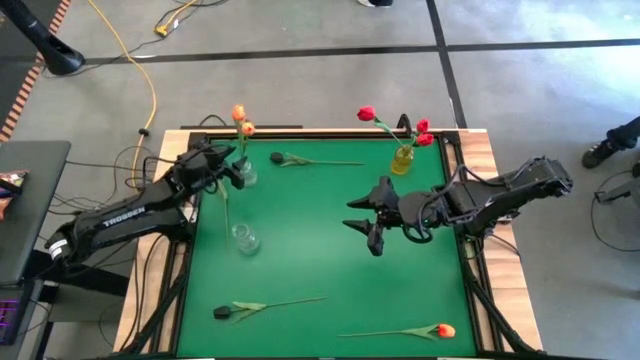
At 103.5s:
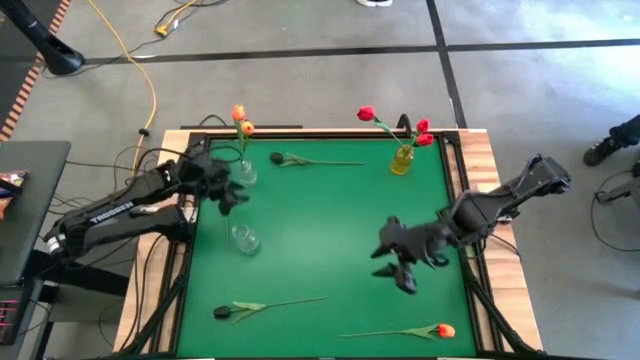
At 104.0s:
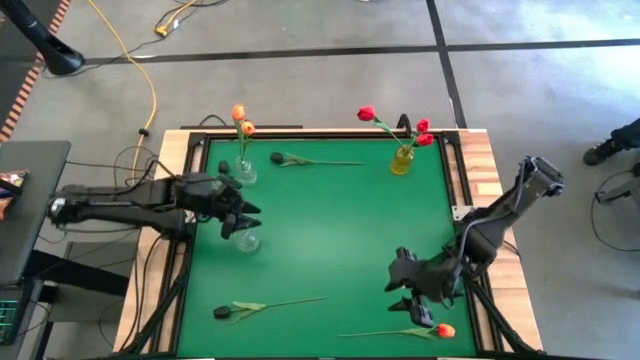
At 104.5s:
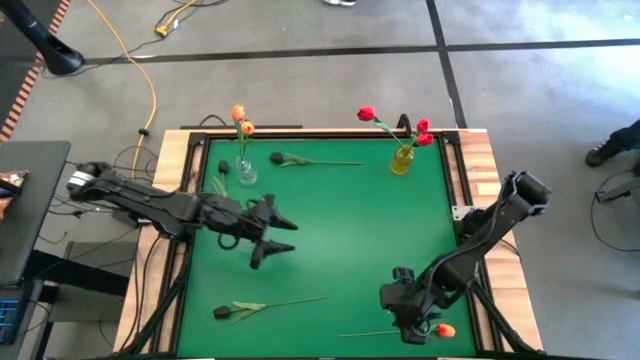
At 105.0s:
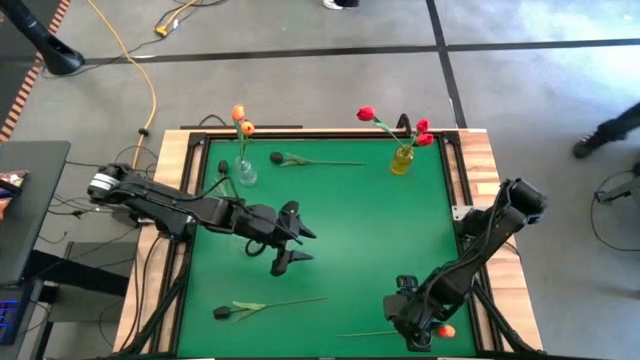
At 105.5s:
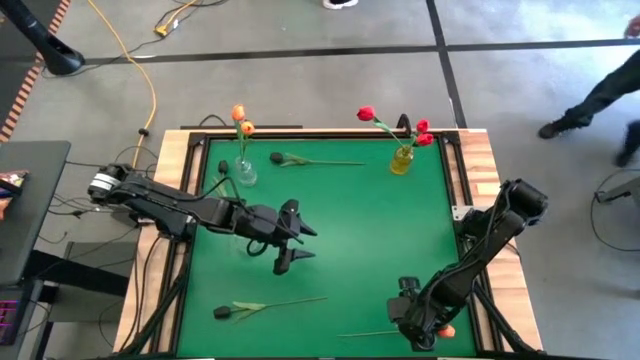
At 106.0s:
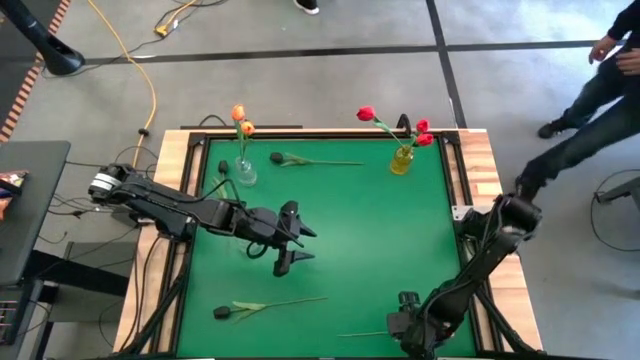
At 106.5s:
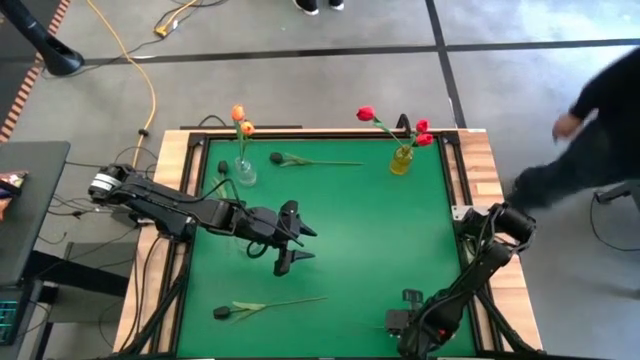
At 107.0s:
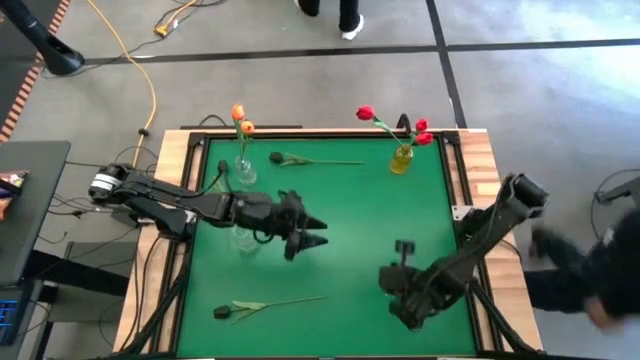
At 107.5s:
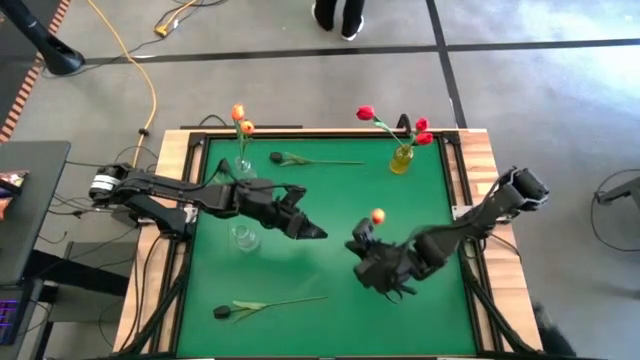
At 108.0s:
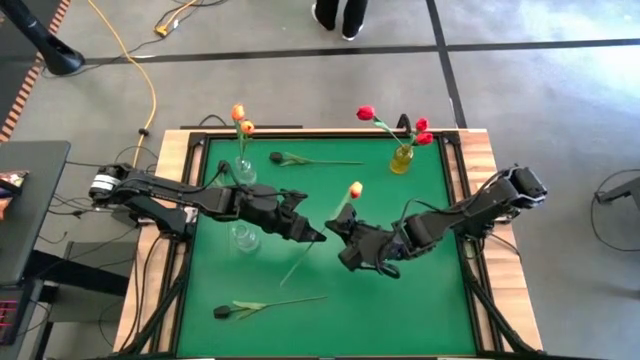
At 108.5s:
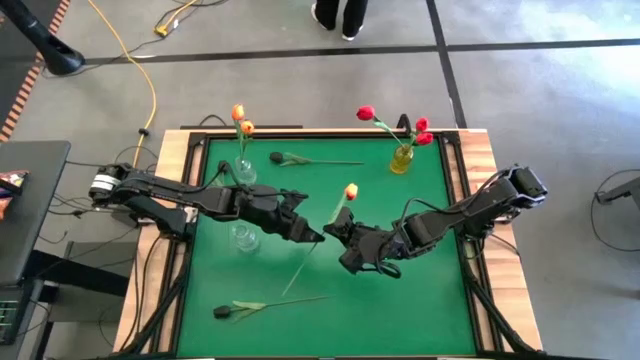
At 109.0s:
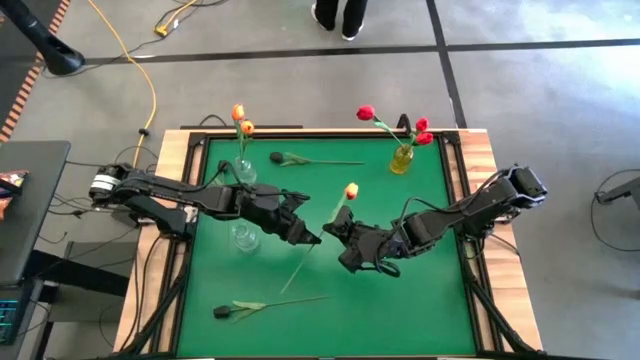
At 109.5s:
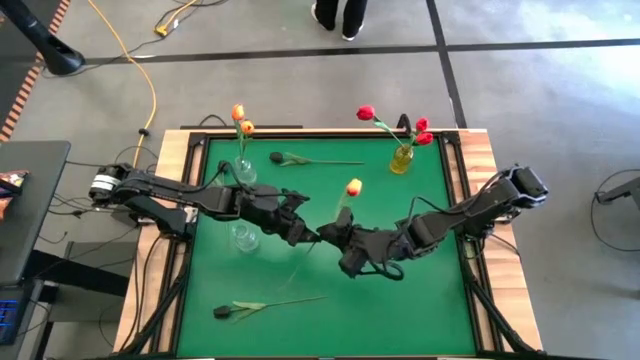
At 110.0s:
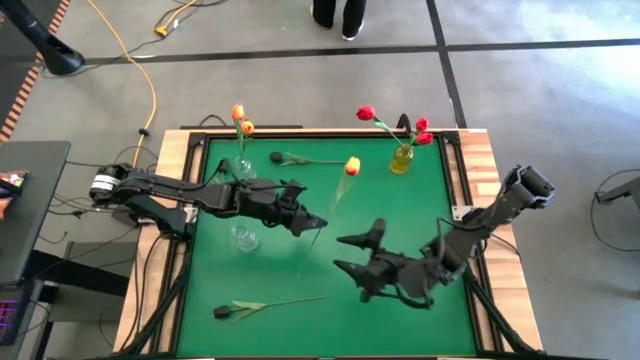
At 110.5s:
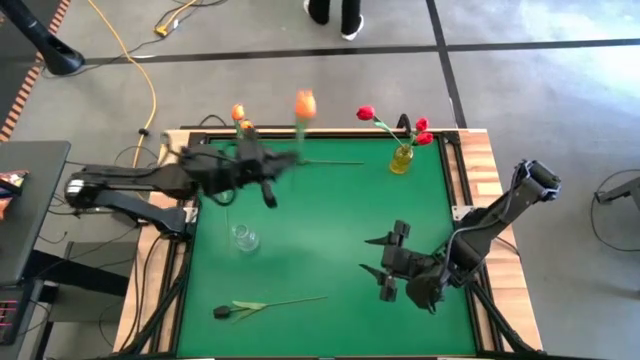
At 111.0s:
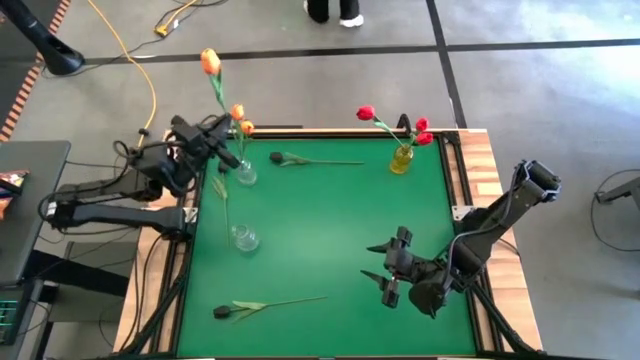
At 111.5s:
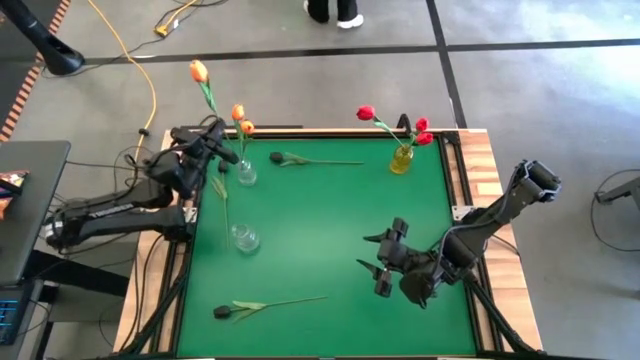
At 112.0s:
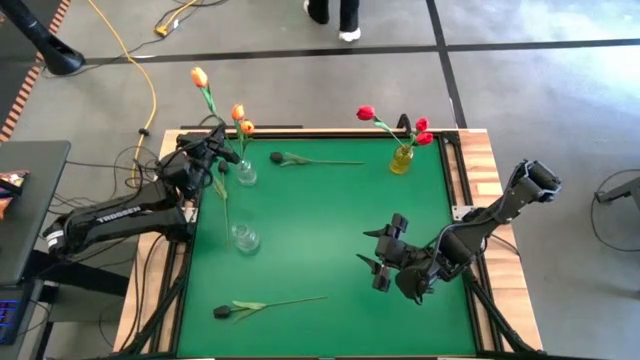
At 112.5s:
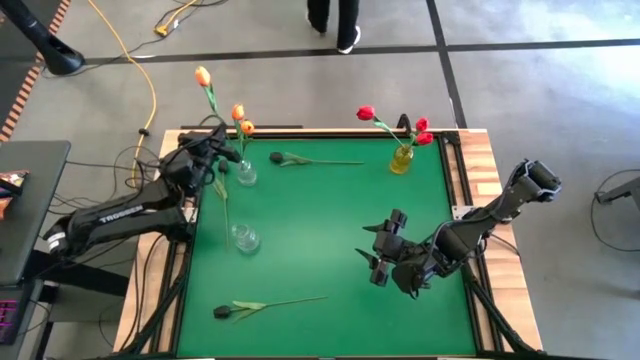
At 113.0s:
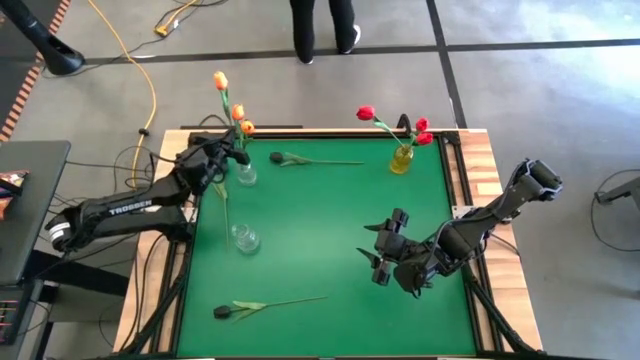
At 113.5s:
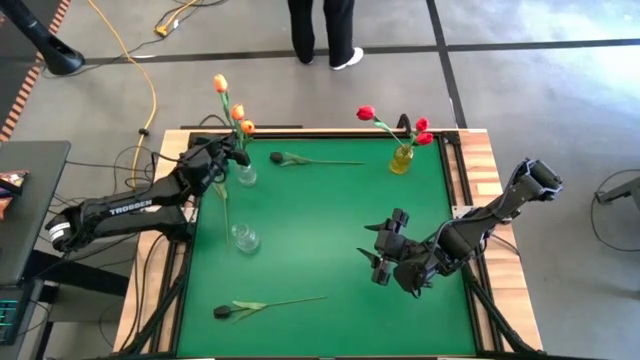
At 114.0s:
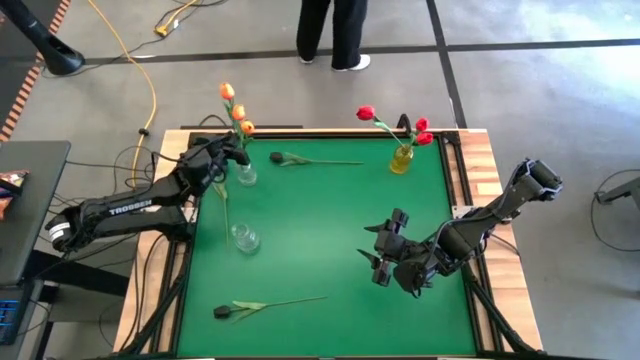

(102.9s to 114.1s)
Task: Sort flowers into vase by color
Put the orange flower into the top transparent vase

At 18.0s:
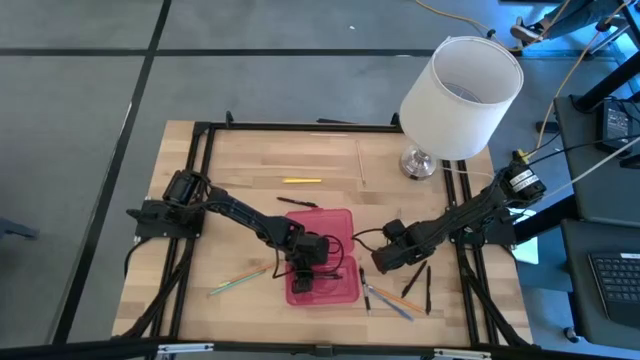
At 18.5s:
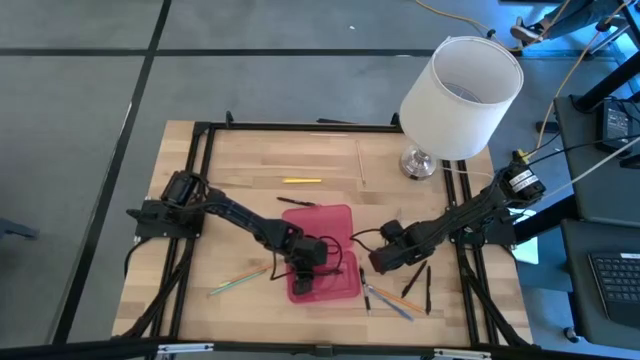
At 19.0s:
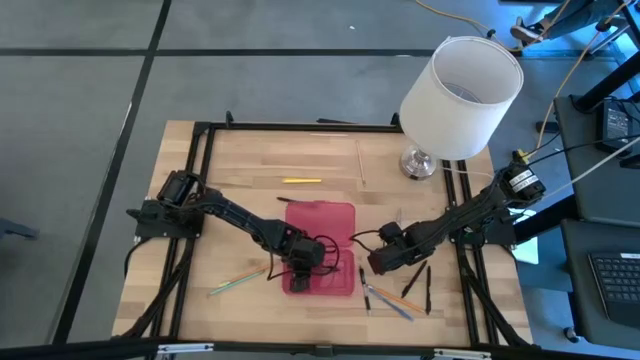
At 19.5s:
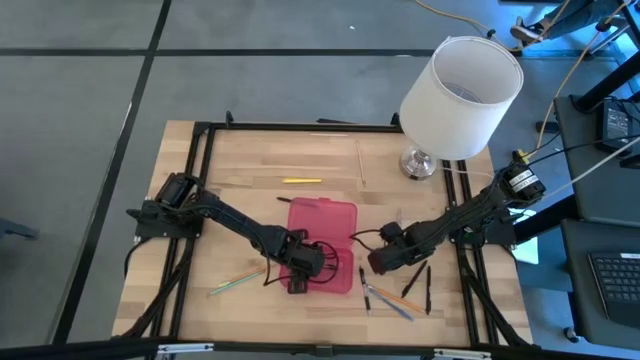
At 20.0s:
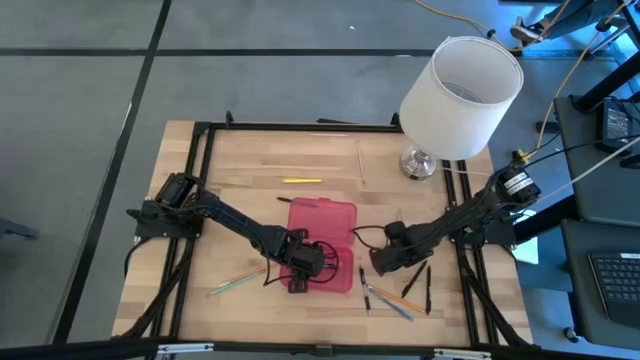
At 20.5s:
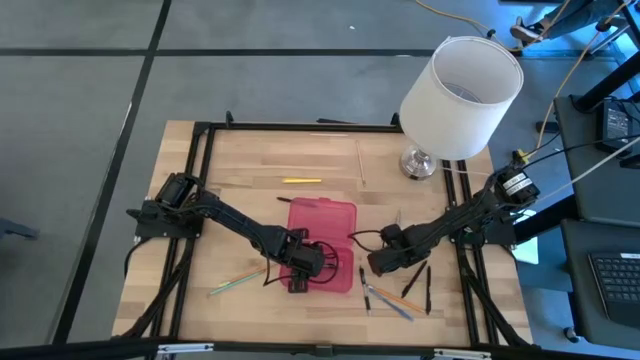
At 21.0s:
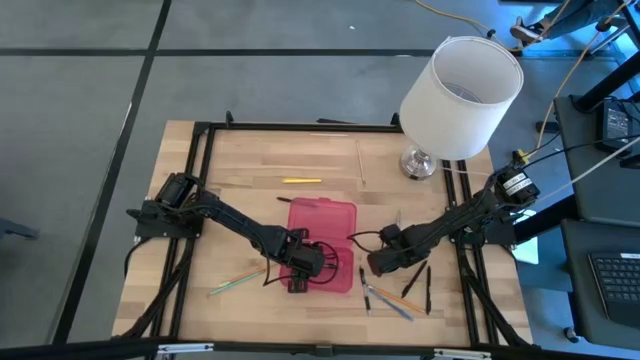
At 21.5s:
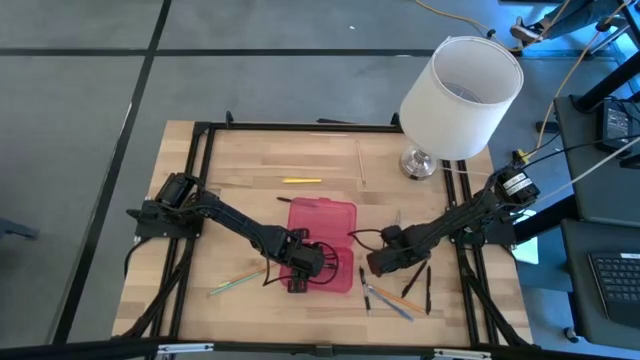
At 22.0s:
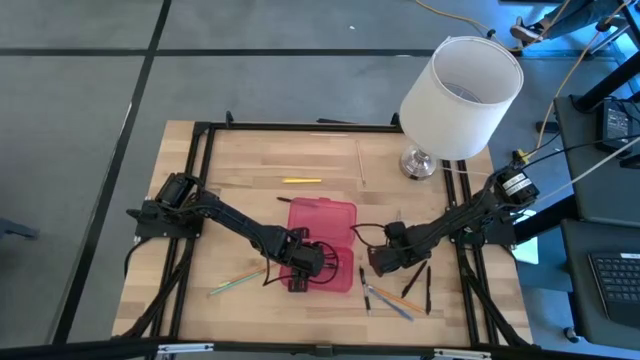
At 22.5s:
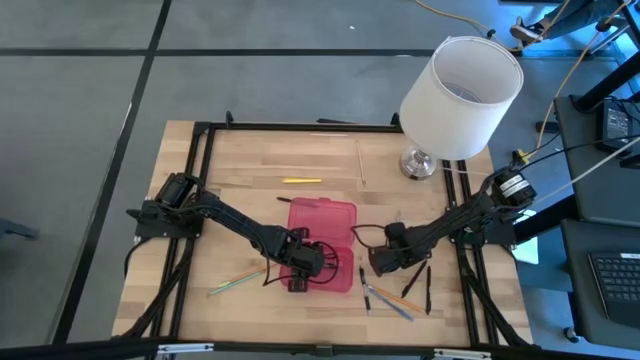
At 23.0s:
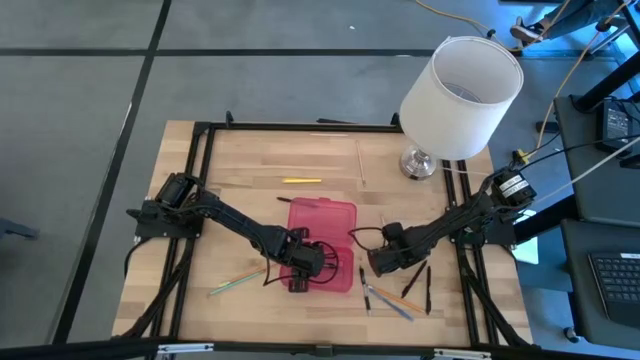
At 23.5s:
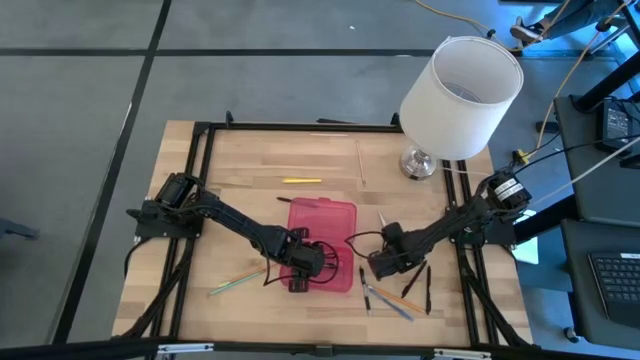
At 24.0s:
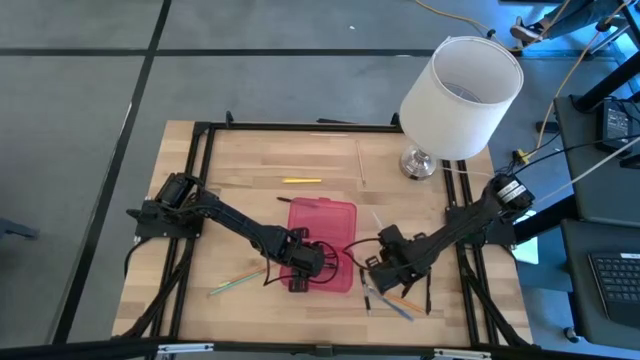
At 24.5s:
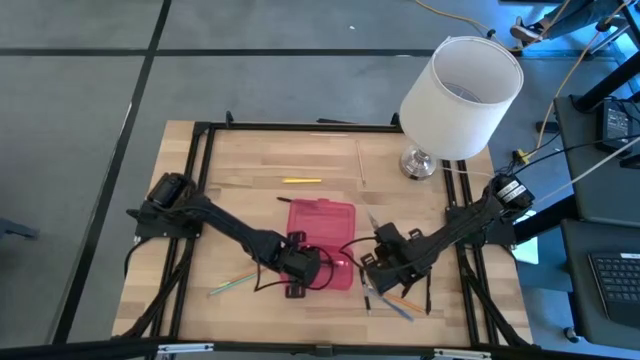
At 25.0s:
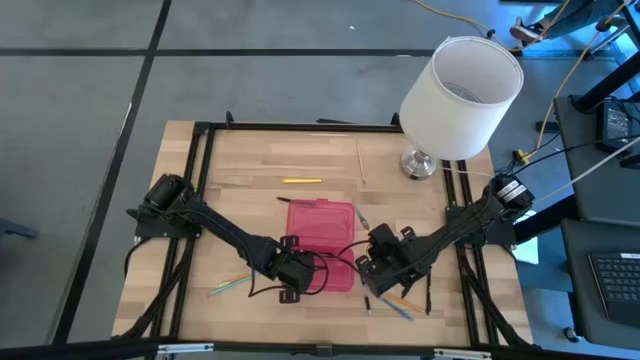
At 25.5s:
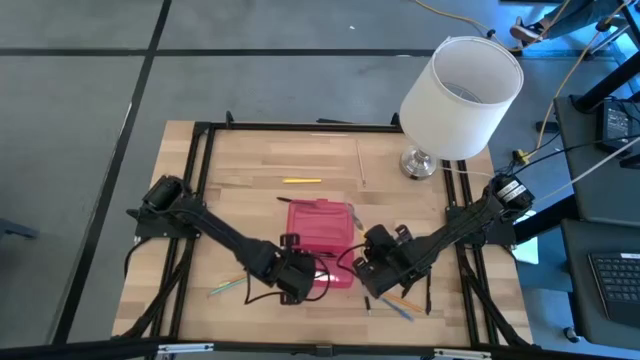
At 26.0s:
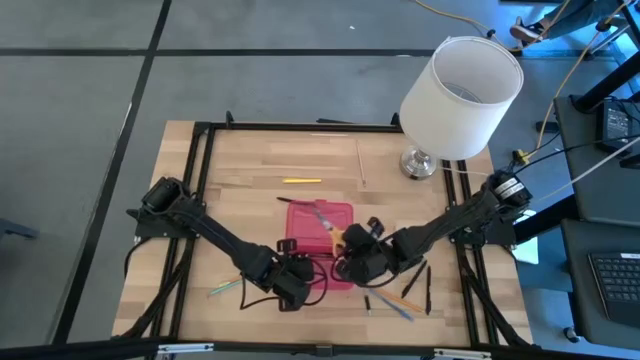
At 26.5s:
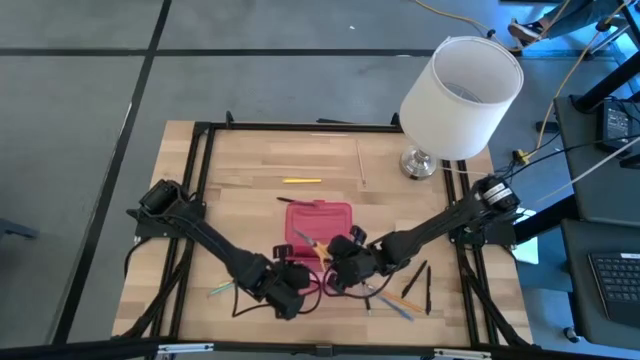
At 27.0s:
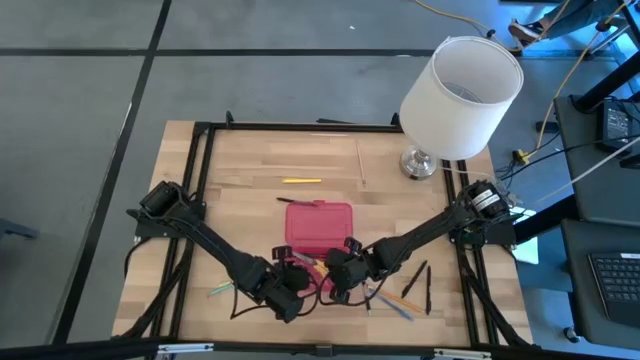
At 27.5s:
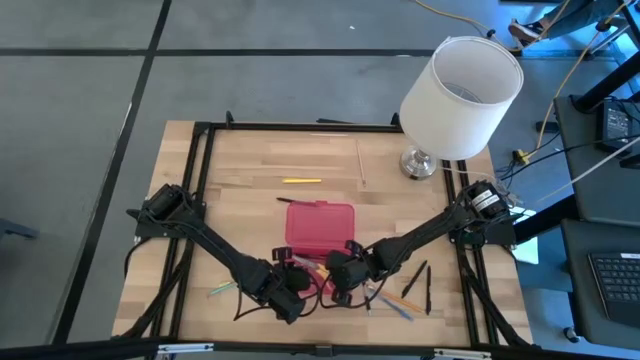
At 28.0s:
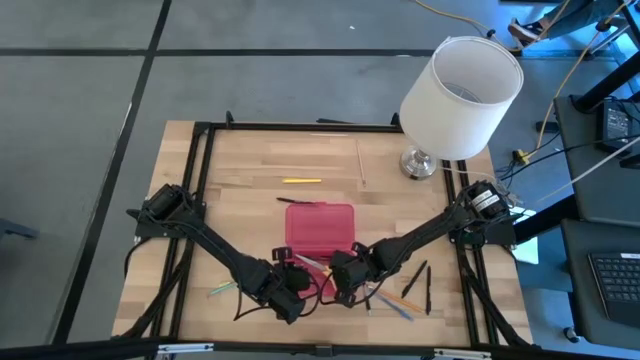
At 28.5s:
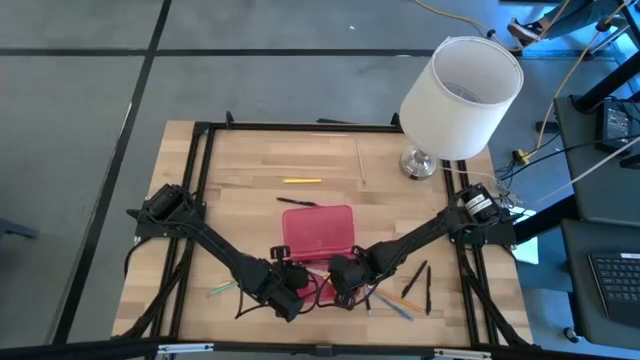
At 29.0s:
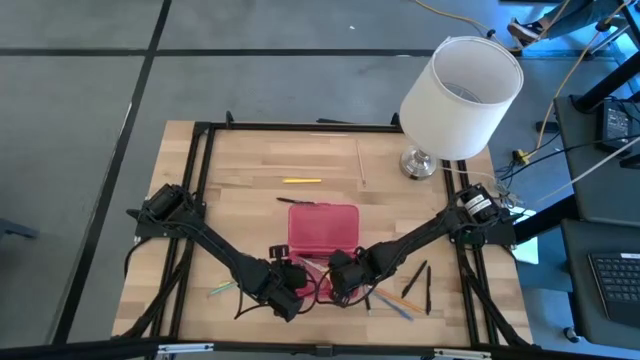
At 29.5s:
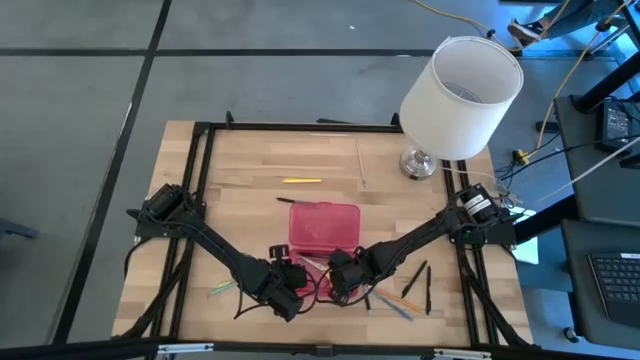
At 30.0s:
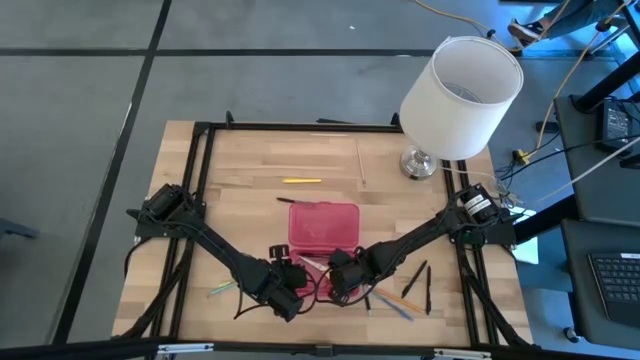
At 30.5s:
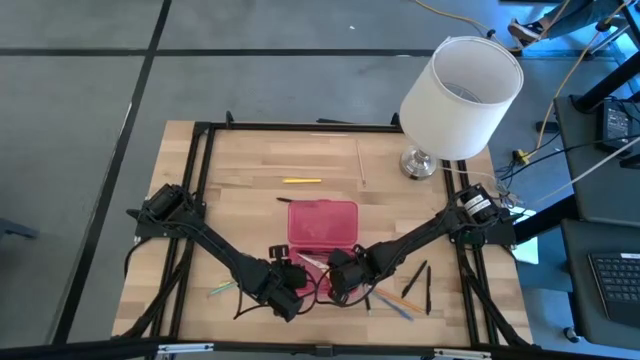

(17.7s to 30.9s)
Task: Pick & place school supplies into a supply box
Put the yellow scissors into the red supply box
